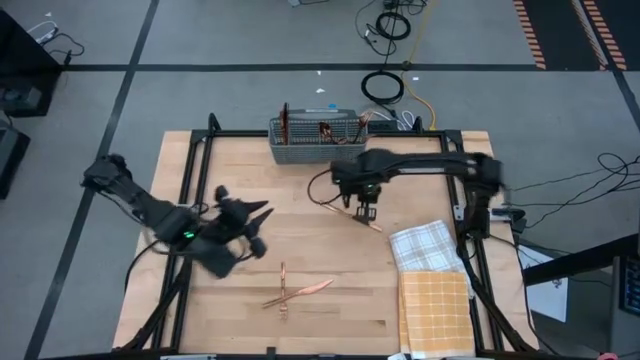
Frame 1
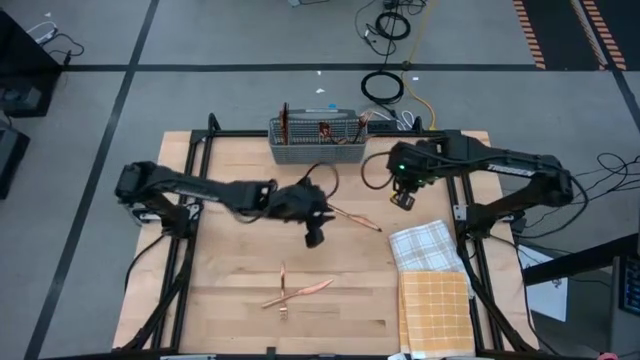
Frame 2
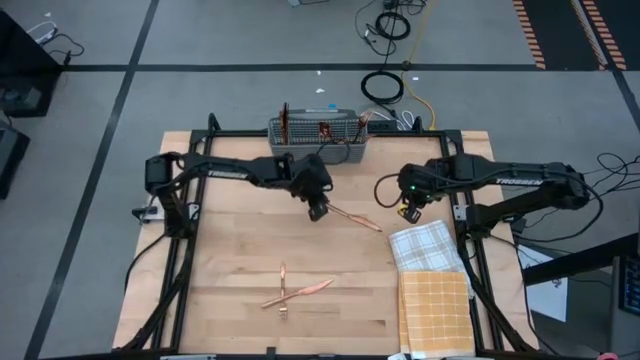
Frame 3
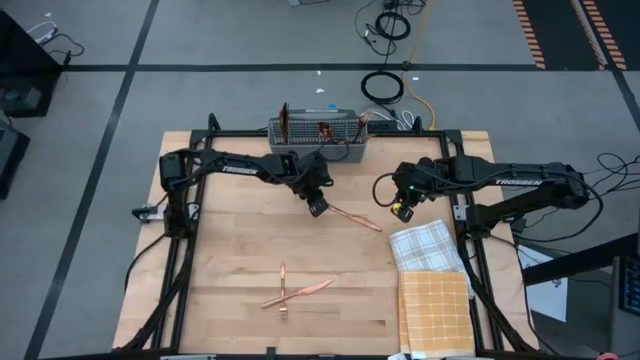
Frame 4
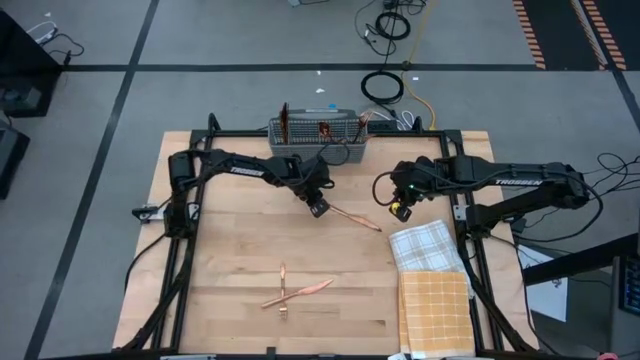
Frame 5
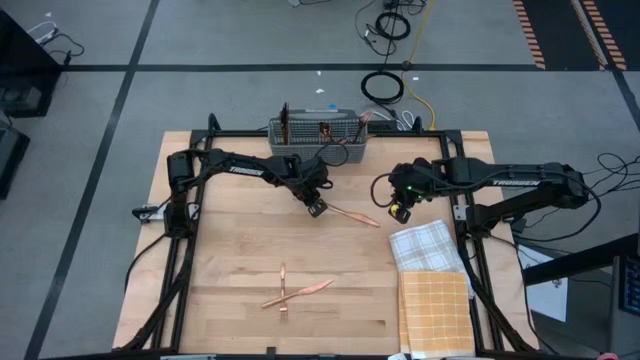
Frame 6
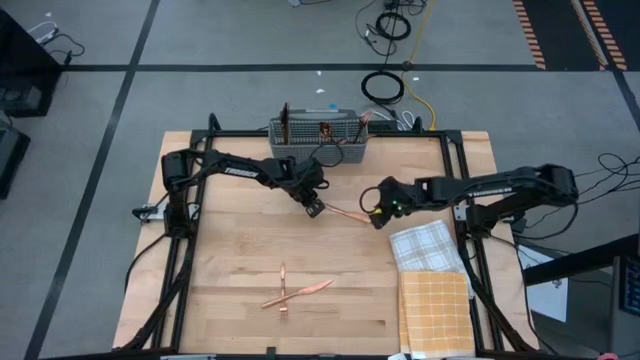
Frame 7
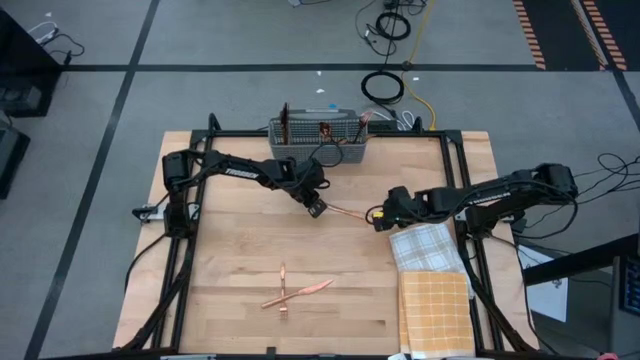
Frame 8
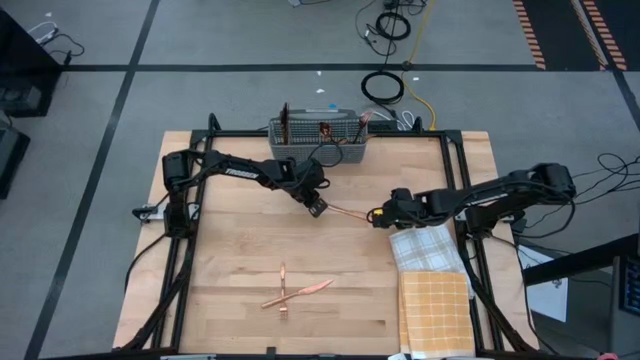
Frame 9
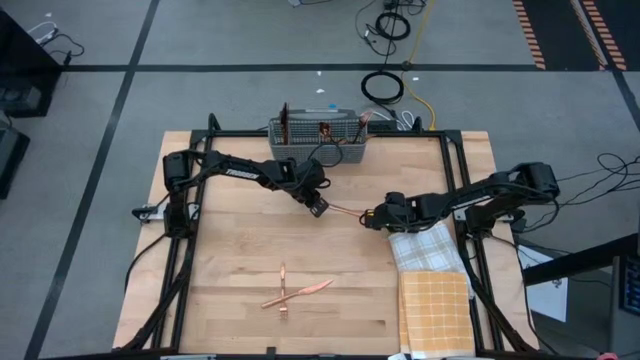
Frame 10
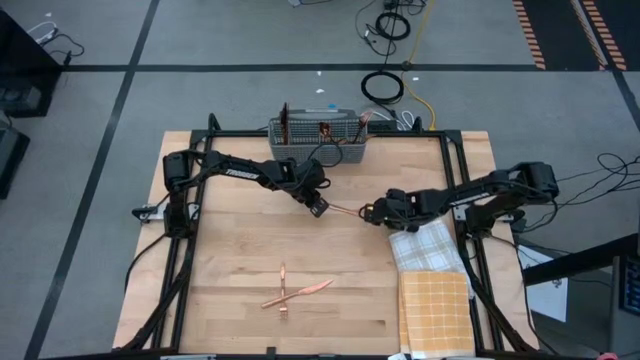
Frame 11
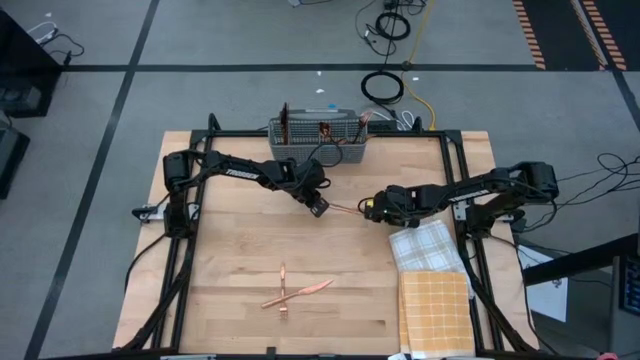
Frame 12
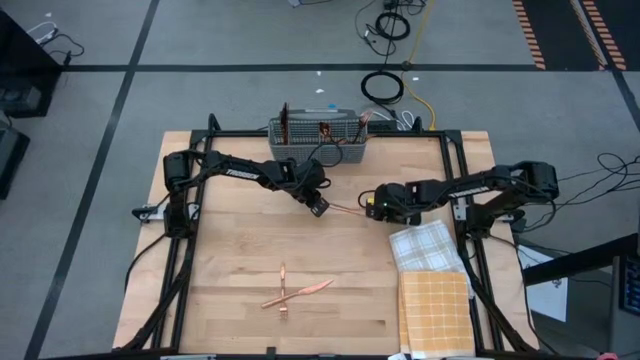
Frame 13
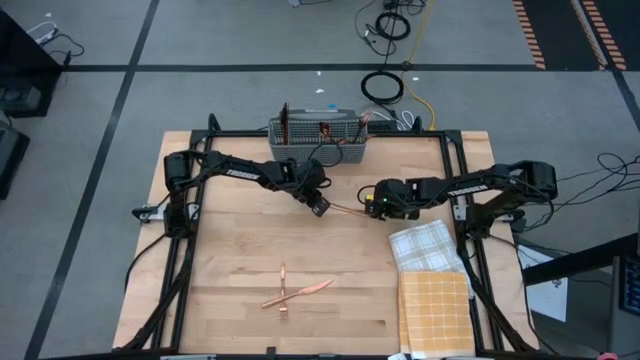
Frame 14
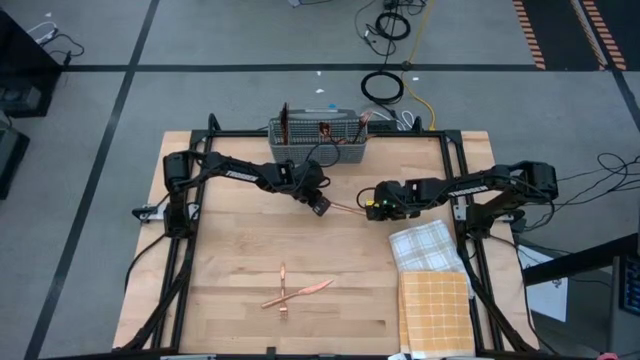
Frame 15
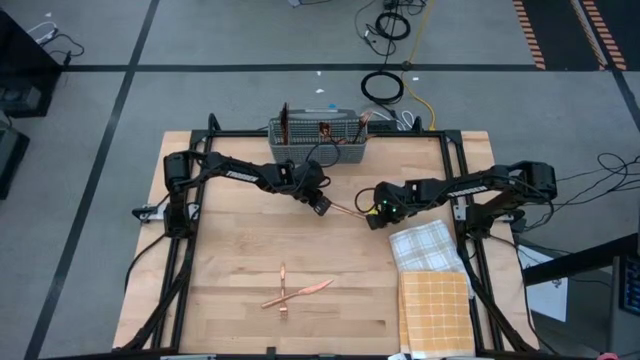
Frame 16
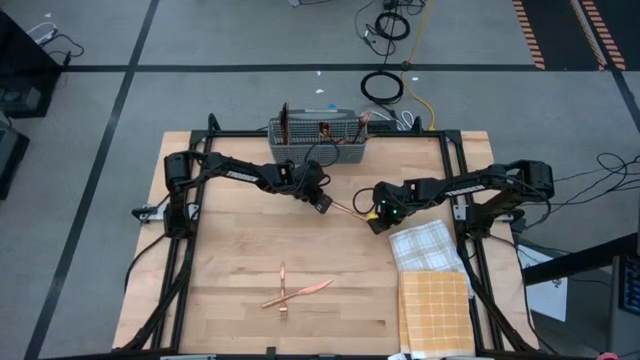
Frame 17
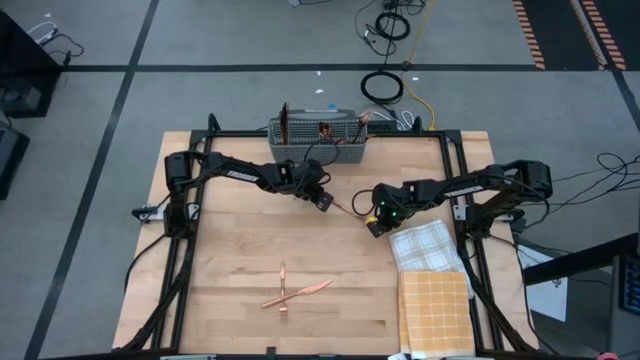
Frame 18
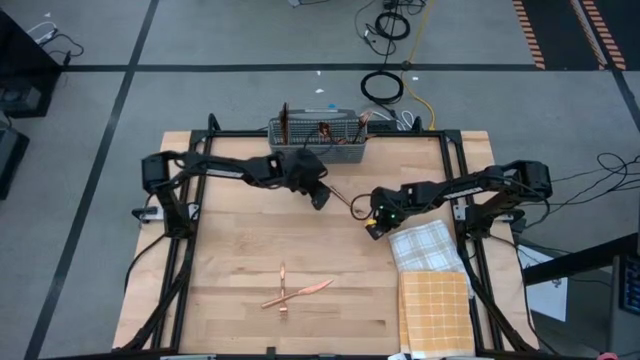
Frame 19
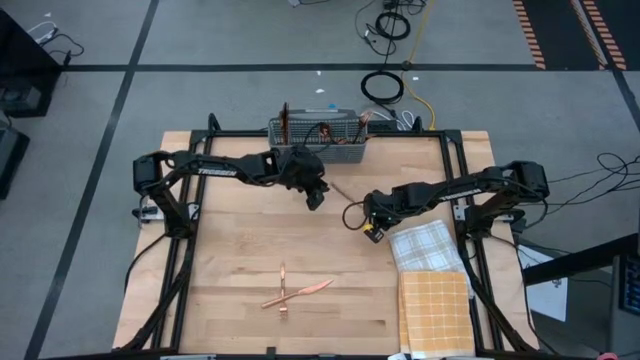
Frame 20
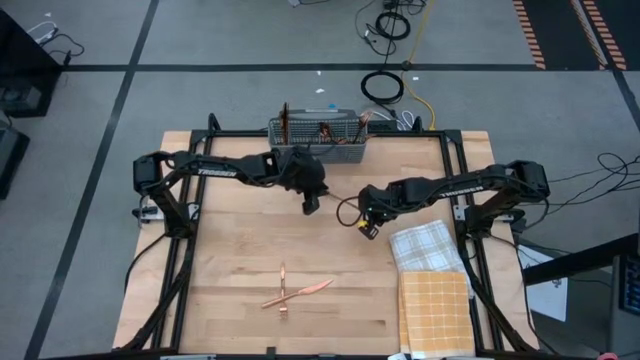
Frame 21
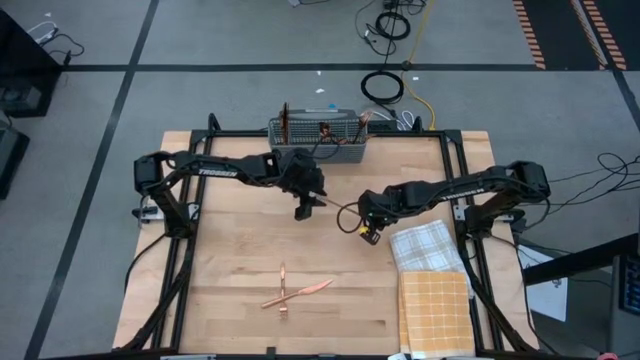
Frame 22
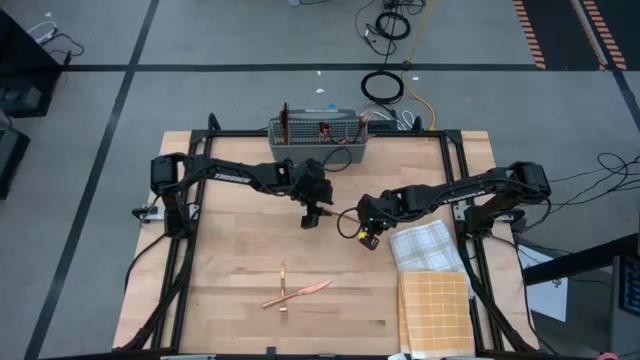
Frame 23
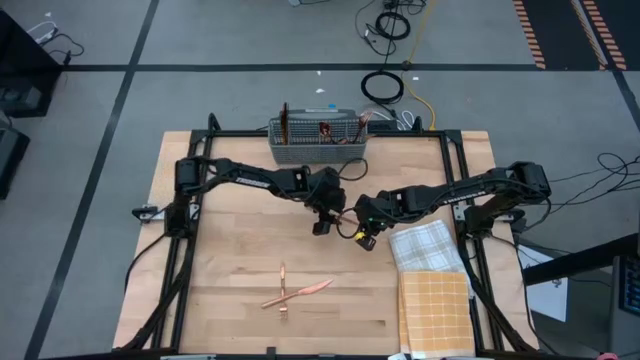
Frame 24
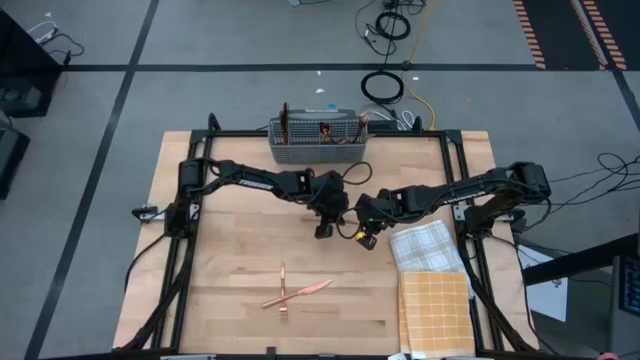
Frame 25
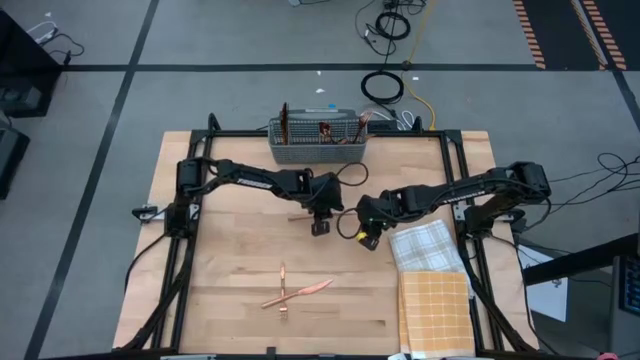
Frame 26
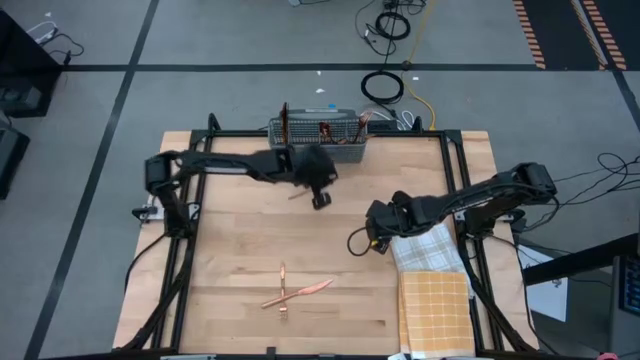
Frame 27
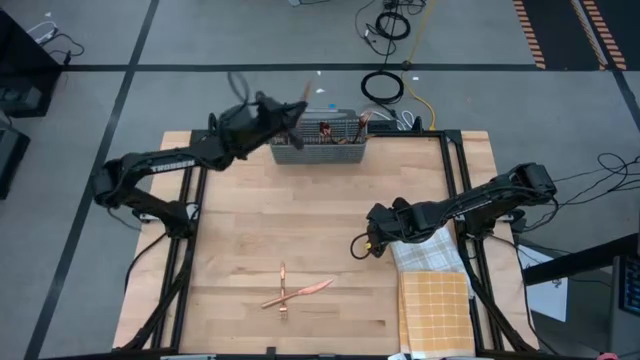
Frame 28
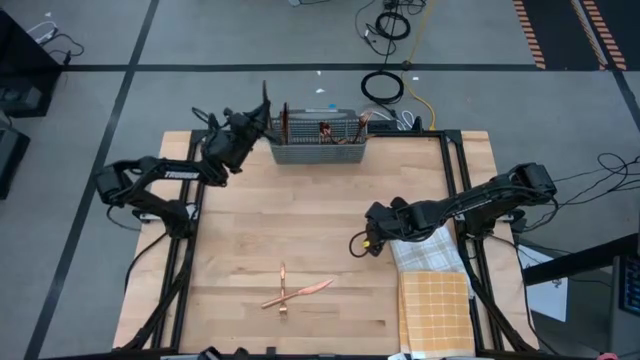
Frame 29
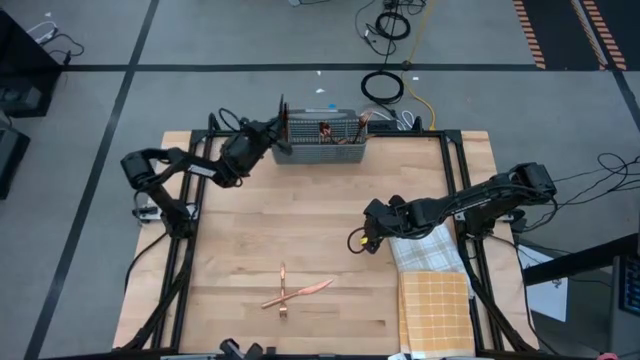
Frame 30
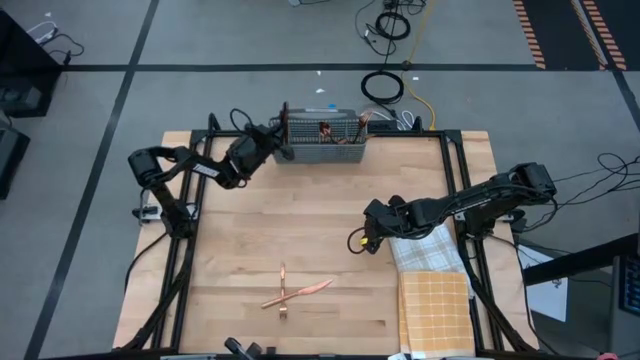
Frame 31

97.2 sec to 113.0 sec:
Task: Sort silverware
Put the top bronze knife into the gray silverware rack

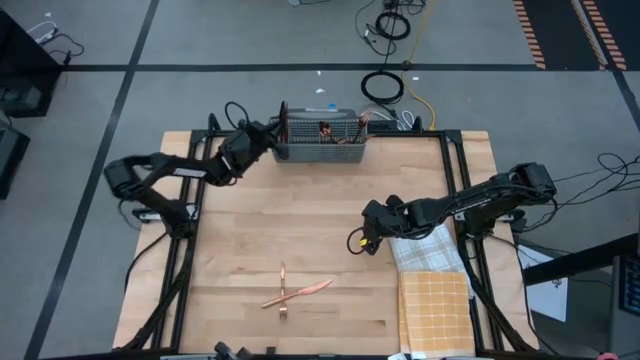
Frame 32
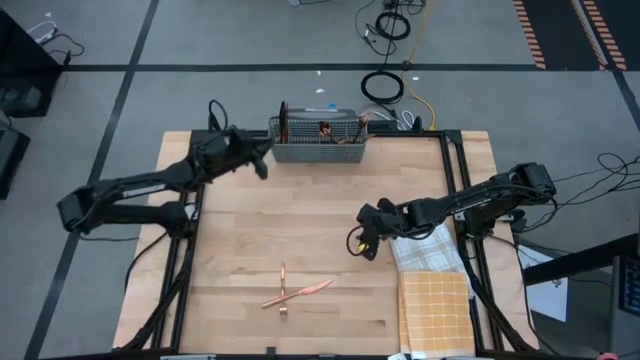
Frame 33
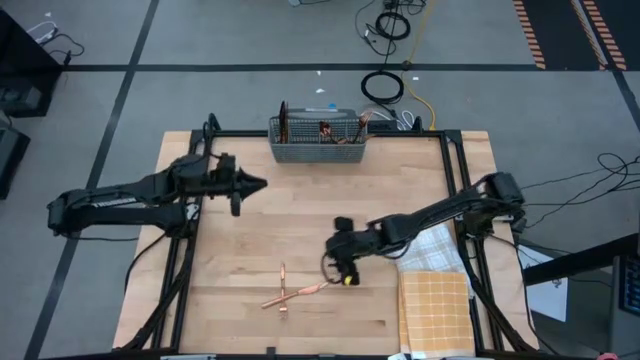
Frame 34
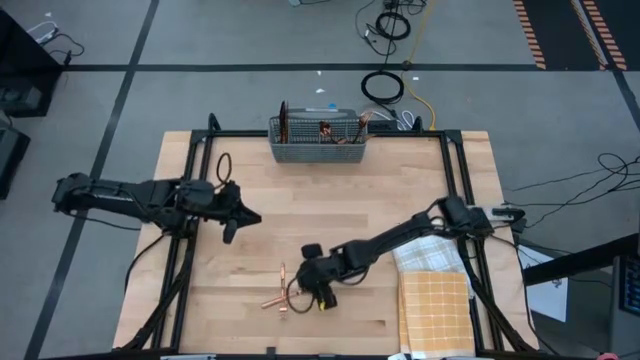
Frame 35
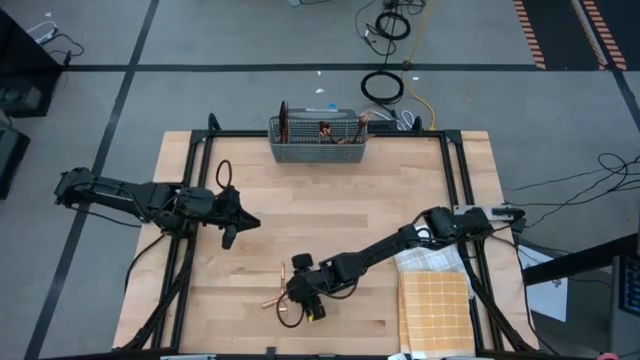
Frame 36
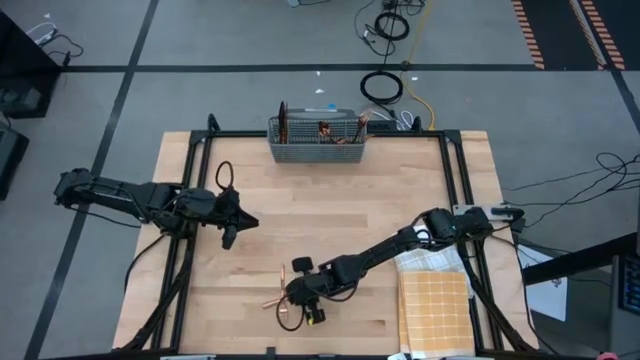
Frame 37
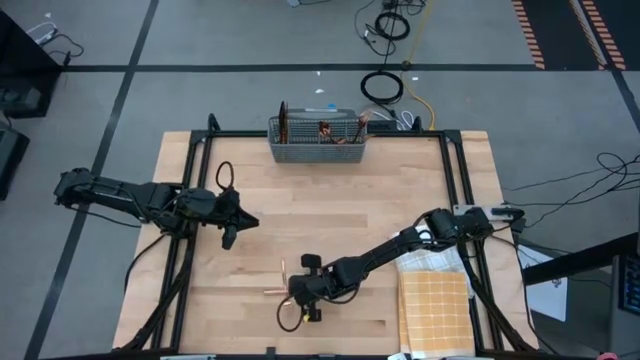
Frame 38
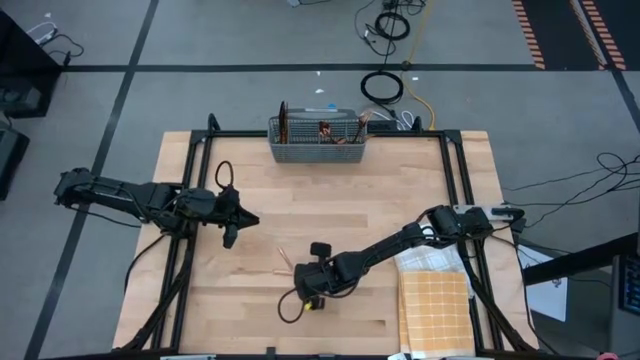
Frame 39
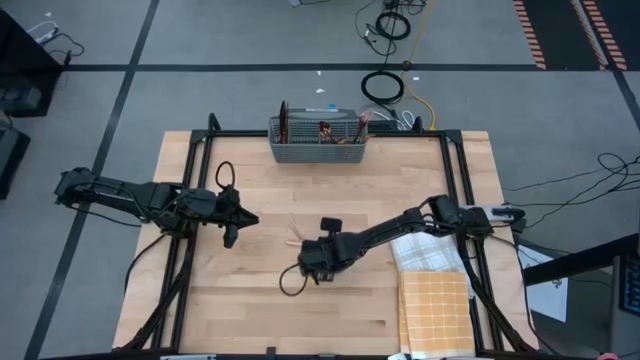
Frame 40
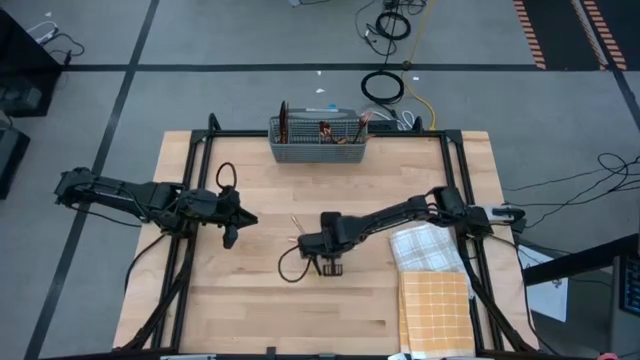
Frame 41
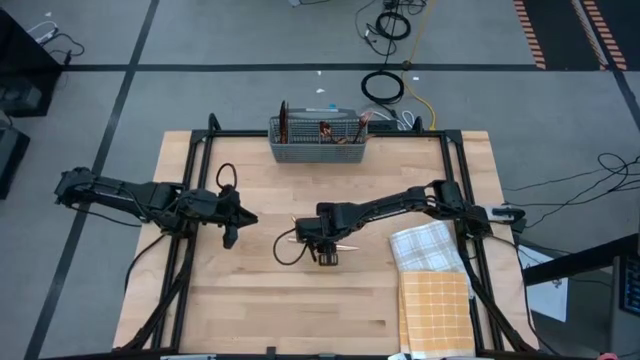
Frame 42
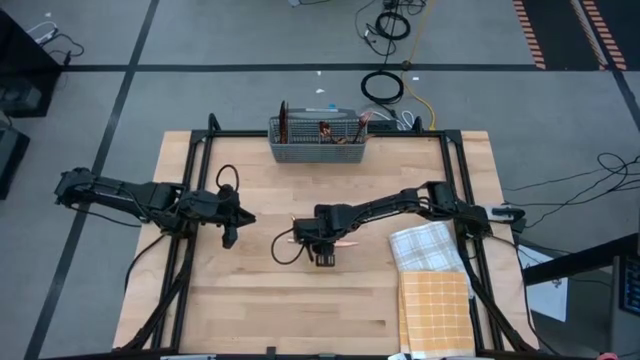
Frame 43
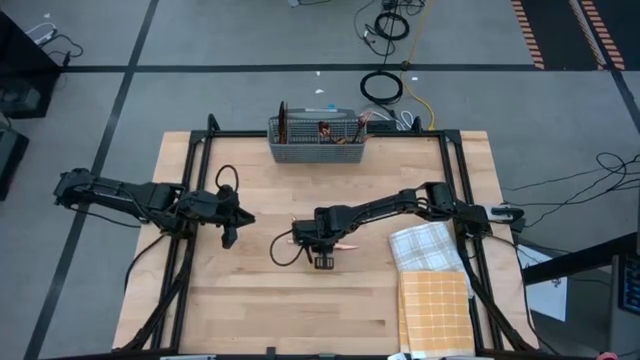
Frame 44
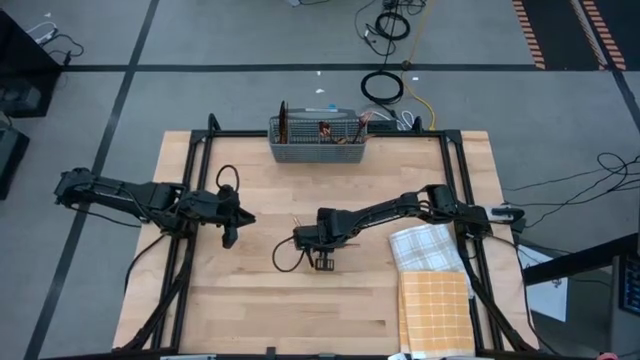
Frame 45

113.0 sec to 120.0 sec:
Put the bronze knife into the gray silverware rack
